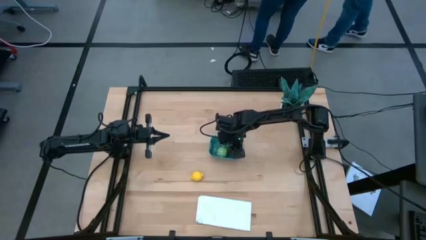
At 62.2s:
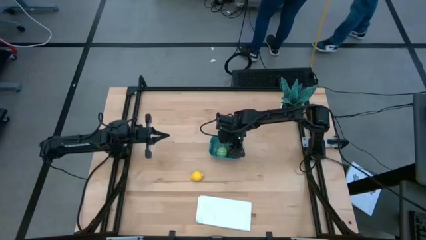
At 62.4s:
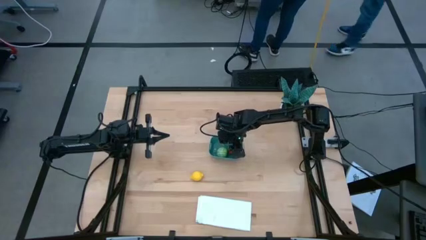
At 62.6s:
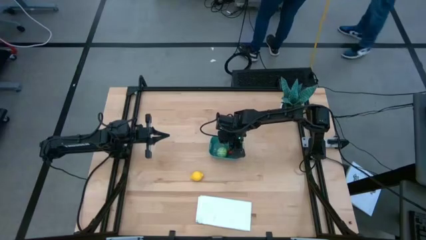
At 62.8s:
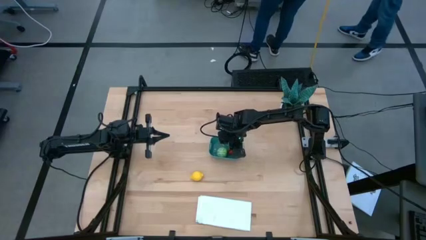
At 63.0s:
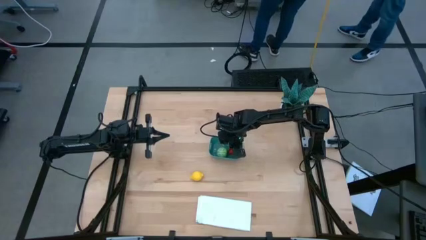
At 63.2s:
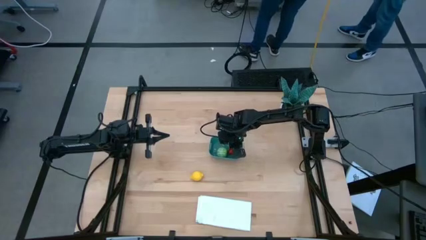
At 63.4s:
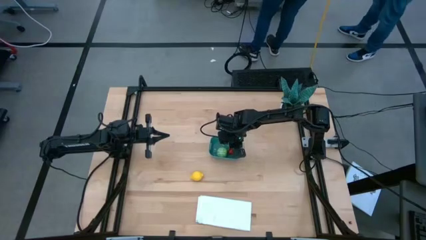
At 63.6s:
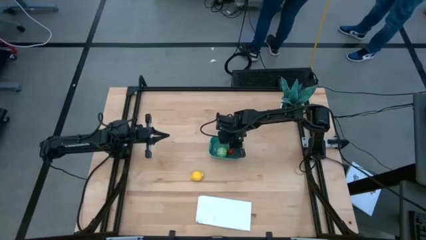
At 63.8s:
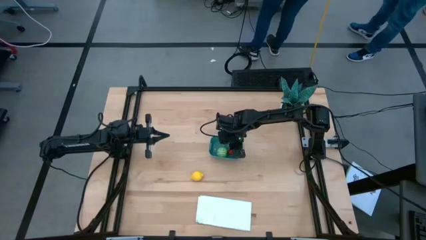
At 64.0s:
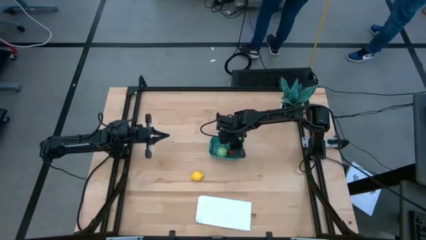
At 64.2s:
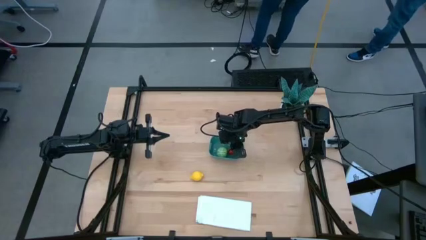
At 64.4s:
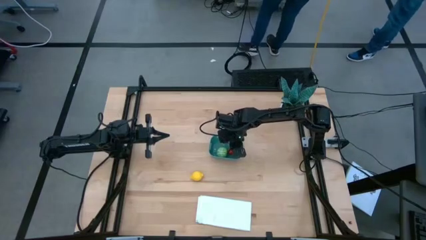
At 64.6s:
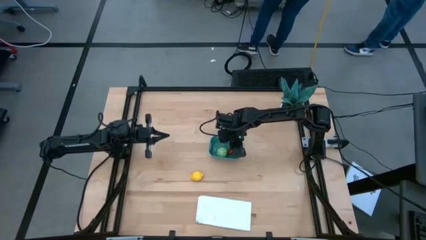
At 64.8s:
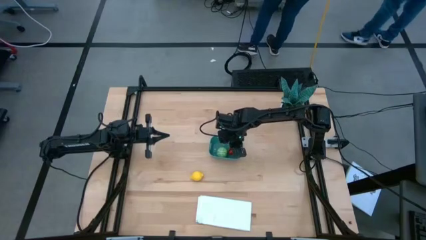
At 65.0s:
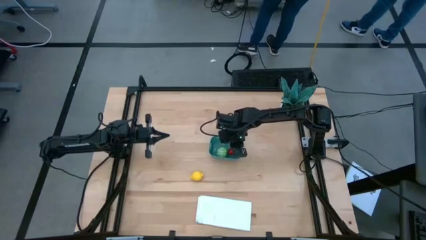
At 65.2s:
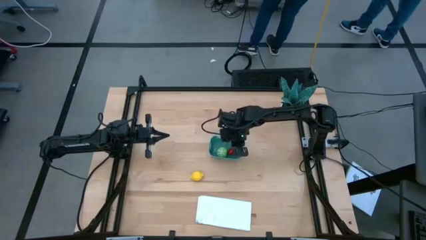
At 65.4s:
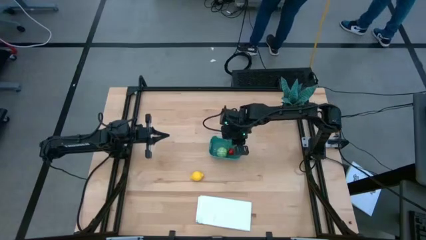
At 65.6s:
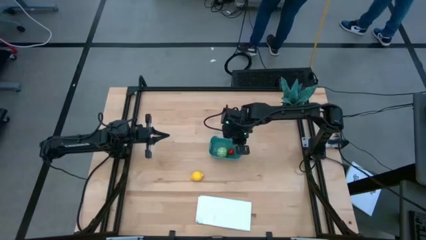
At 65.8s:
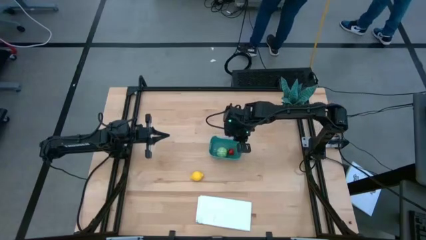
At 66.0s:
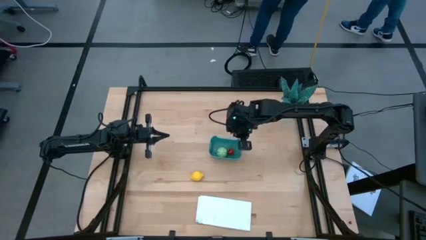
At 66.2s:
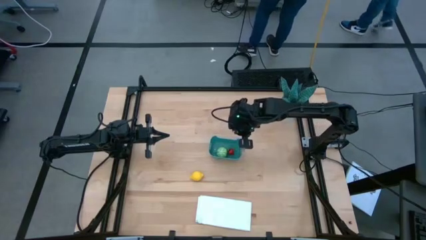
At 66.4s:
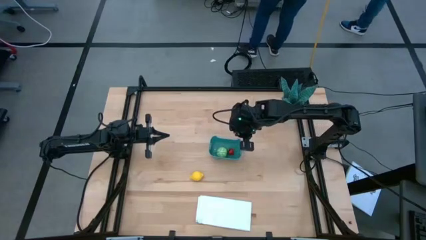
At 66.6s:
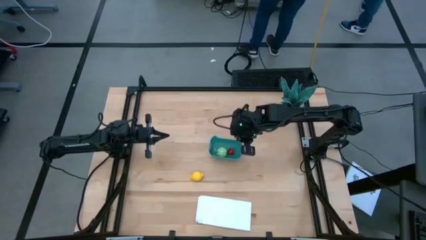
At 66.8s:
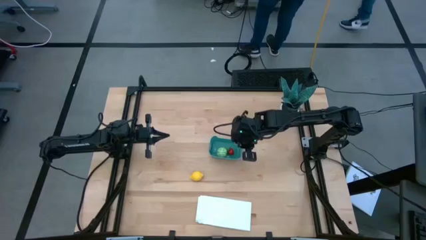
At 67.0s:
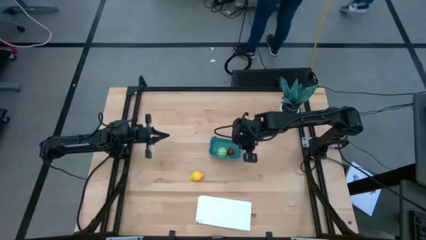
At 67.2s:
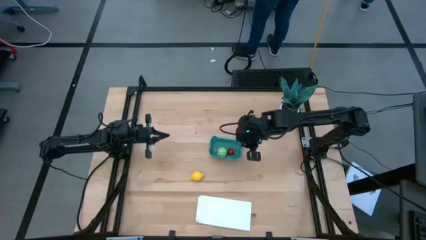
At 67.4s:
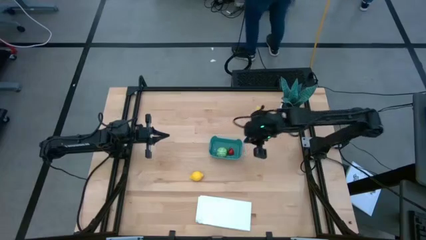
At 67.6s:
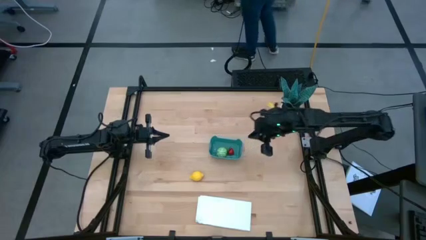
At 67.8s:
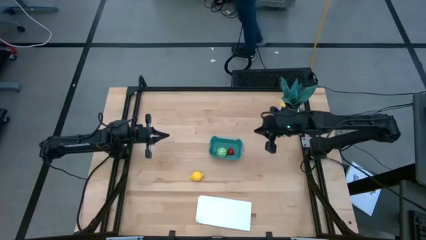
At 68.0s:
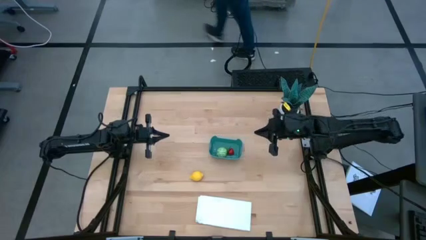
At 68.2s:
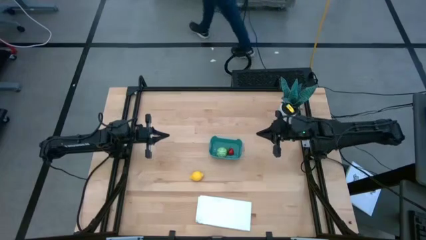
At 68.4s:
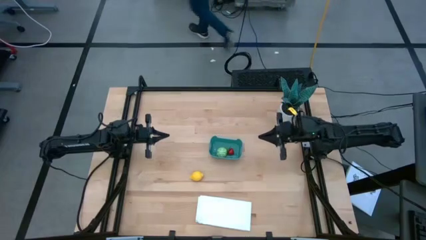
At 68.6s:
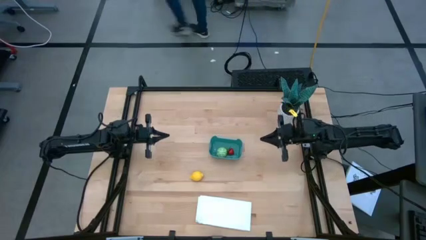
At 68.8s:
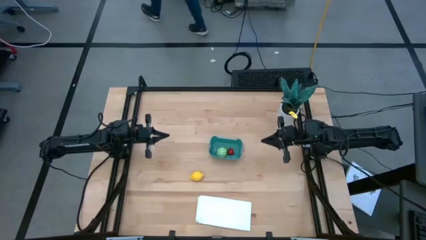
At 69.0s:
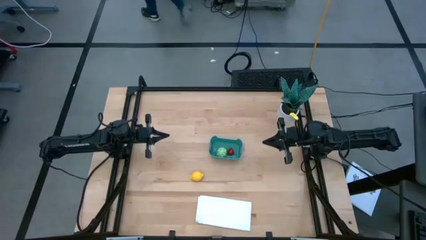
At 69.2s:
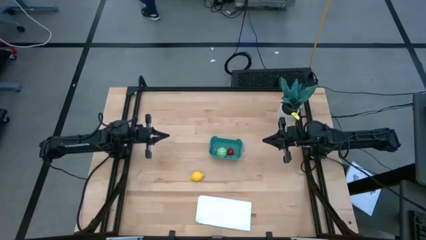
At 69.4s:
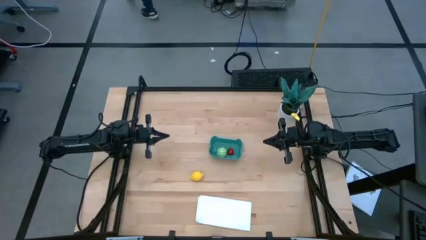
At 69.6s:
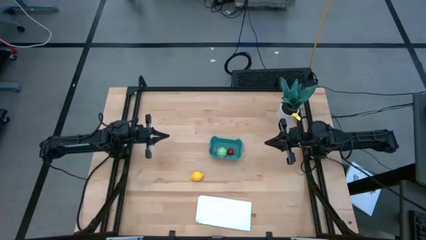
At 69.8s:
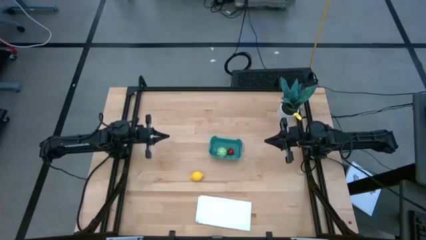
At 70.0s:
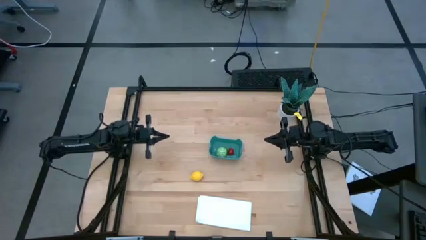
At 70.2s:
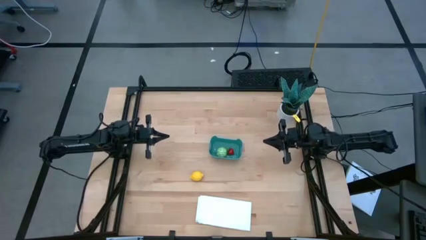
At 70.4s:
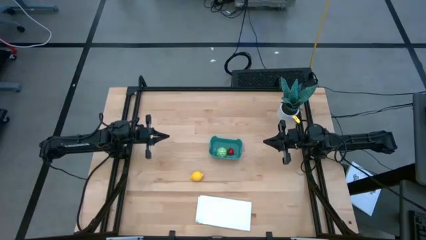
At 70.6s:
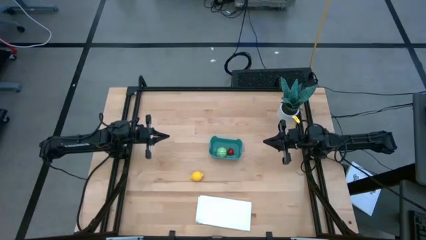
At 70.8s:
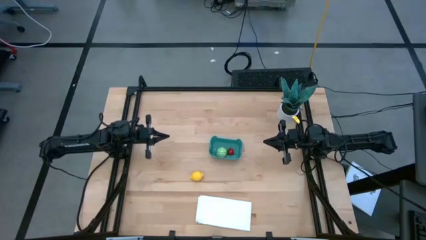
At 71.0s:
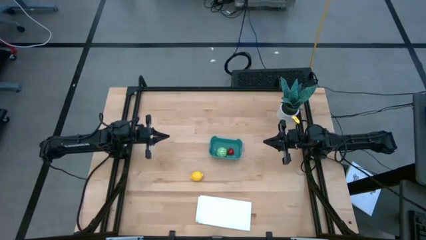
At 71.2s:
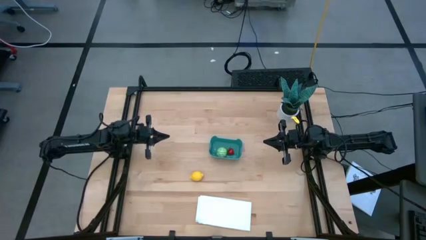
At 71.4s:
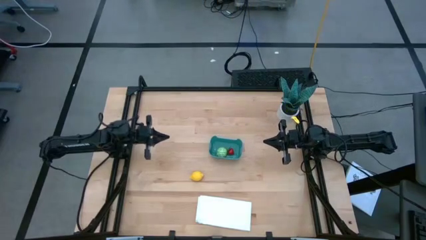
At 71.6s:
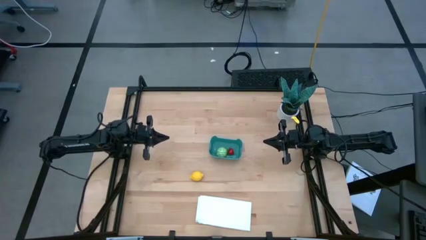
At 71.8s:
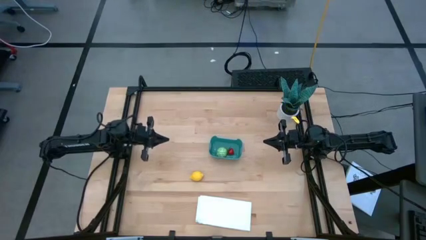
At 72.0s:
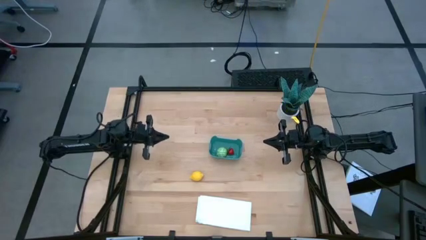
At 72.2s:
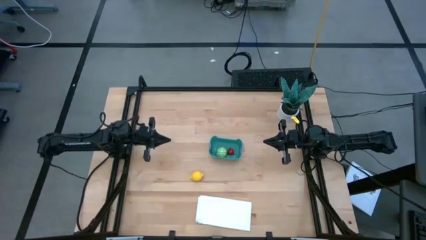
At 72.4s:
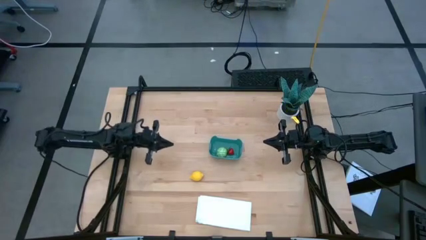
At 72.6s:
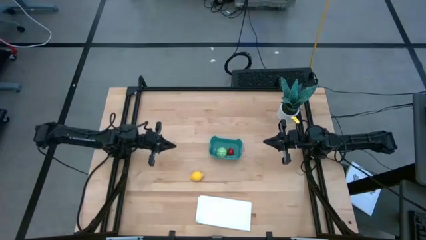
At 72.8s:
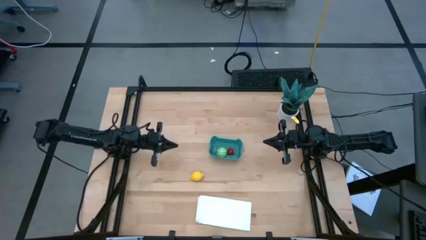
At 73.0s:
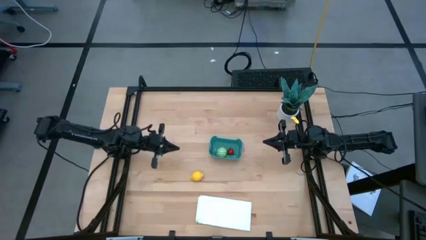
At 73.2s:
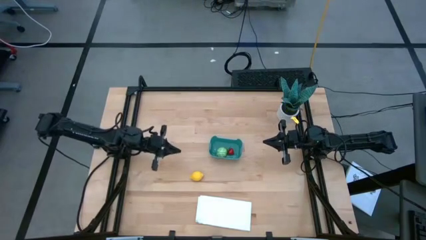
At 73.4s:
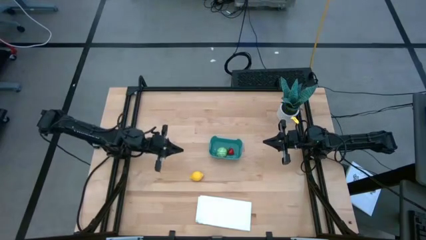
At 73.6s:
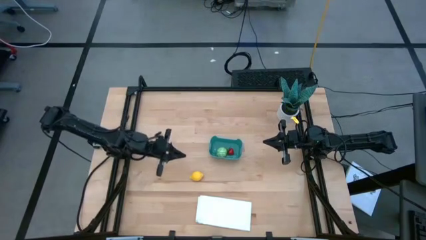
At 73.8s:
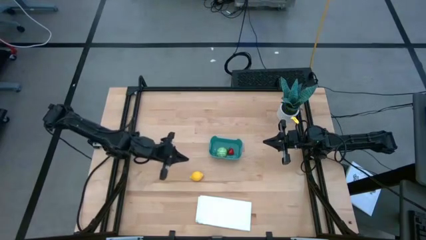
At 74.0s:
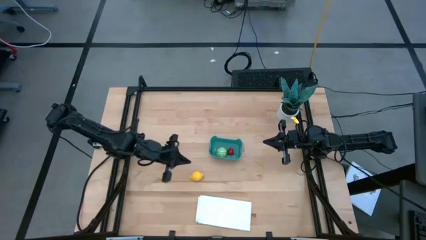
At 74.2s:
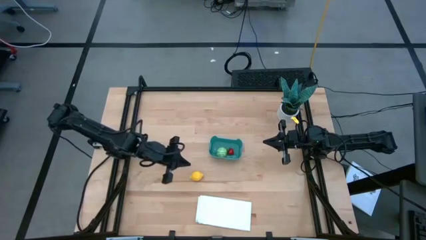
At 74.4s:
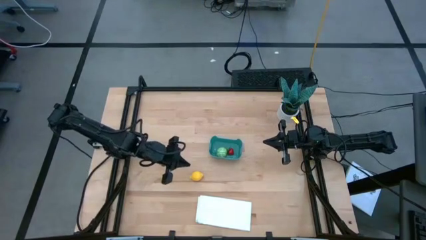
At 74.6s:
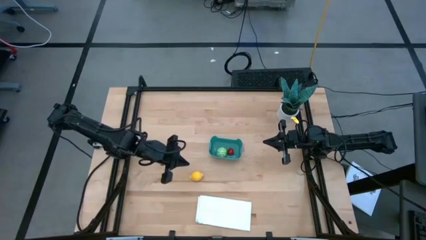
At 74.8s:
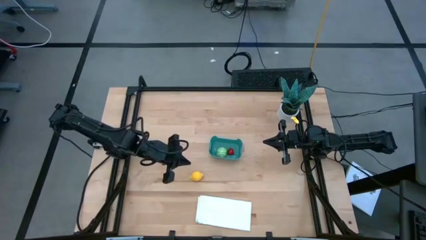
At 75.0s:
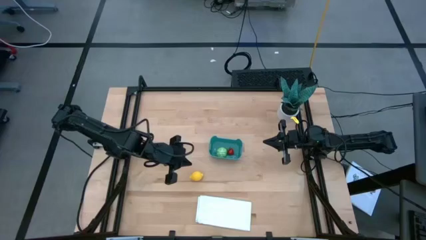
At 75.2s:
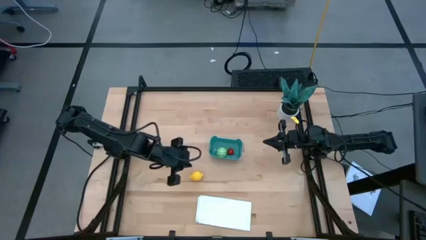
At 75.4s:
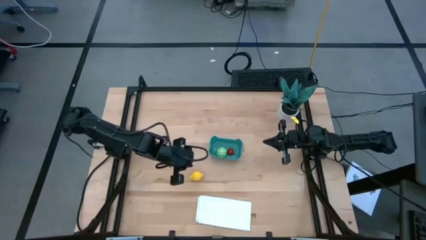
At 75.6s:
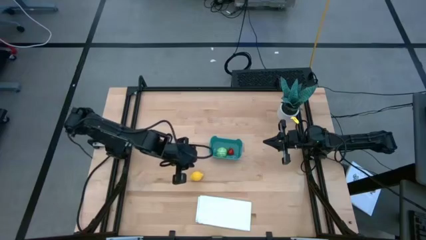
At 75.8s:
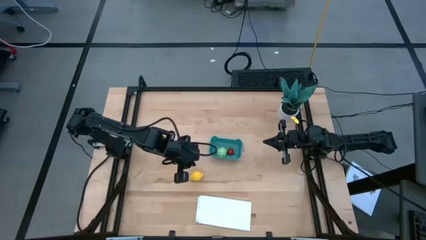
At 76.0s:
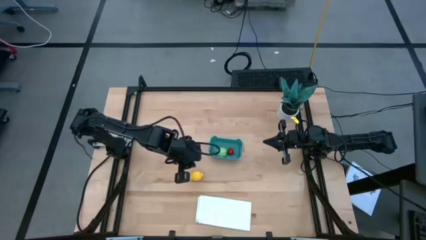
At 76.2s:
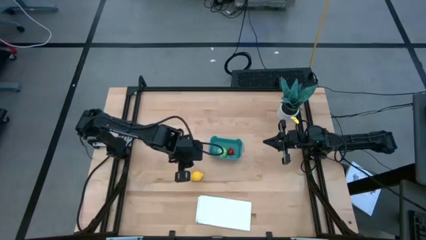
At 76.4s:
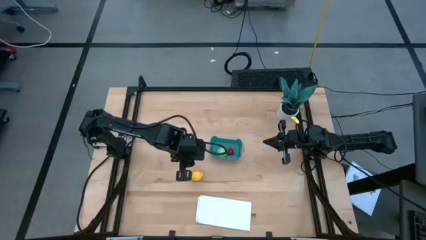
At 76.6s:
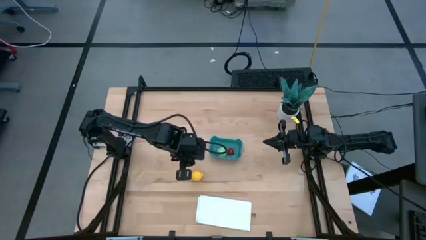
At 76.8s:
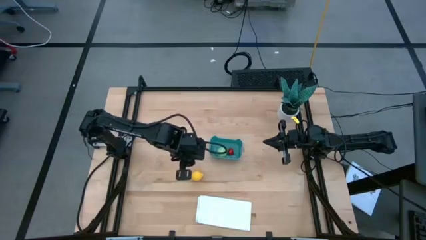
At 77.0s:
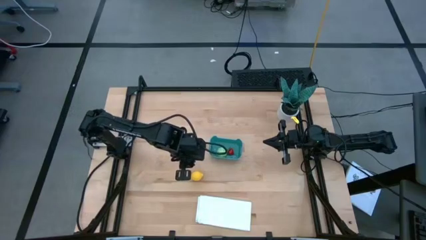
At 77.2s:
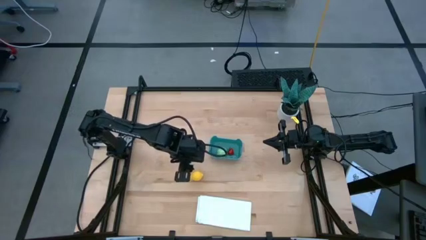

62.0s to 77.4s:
Task: Pick and placing Produce into tupperware
Put the yellow lemon into the blue bin
